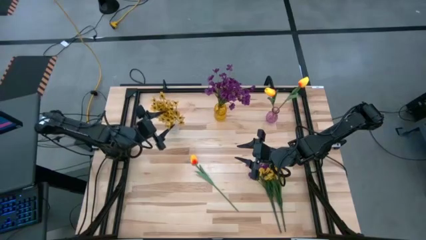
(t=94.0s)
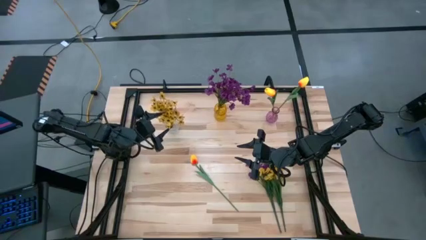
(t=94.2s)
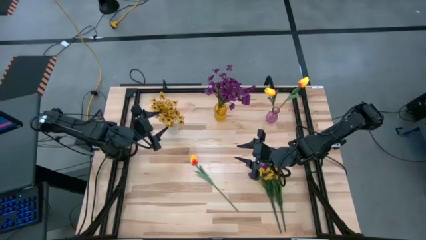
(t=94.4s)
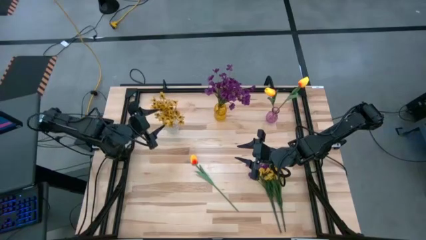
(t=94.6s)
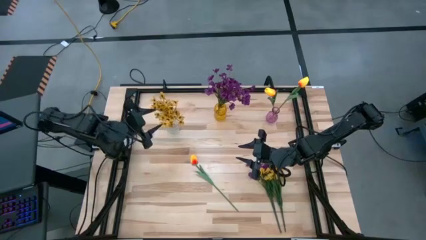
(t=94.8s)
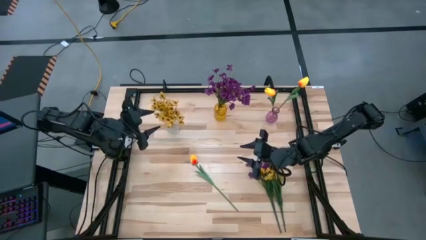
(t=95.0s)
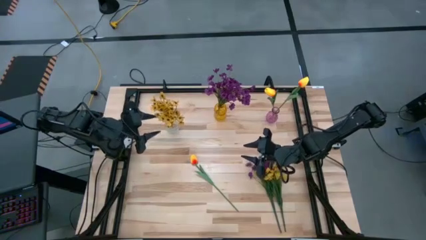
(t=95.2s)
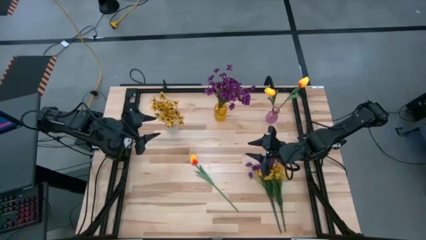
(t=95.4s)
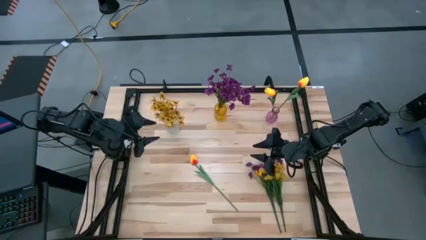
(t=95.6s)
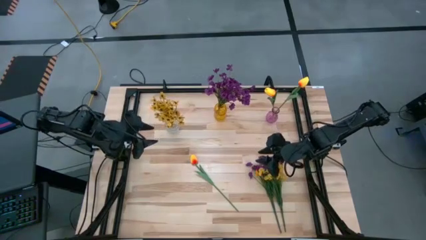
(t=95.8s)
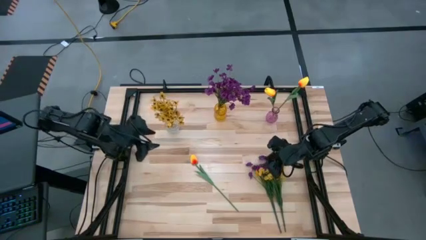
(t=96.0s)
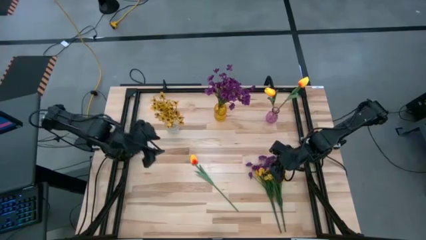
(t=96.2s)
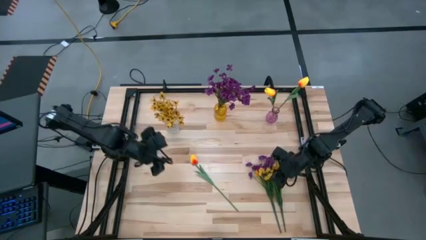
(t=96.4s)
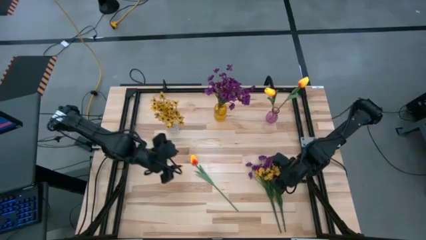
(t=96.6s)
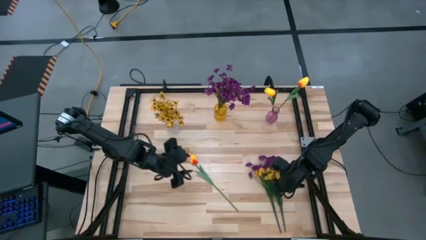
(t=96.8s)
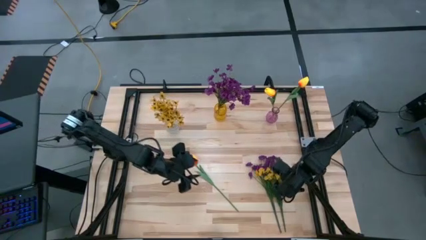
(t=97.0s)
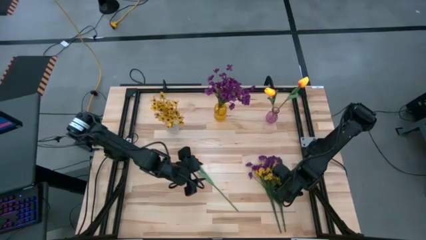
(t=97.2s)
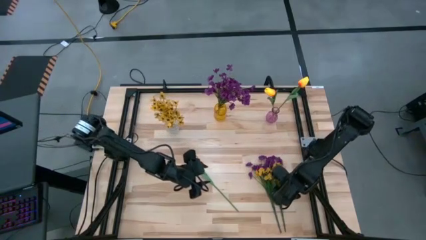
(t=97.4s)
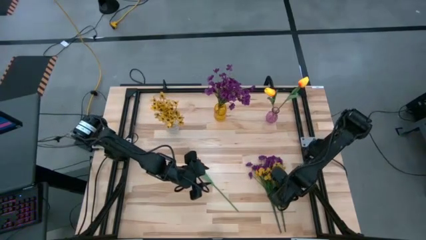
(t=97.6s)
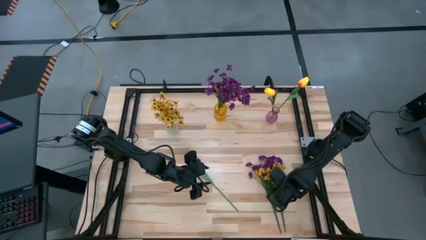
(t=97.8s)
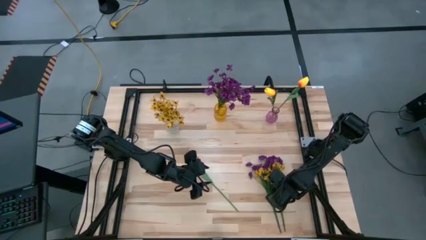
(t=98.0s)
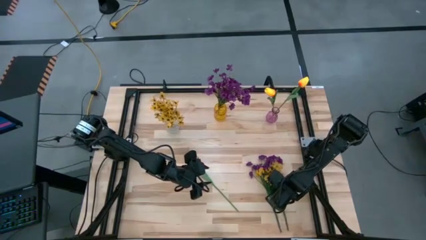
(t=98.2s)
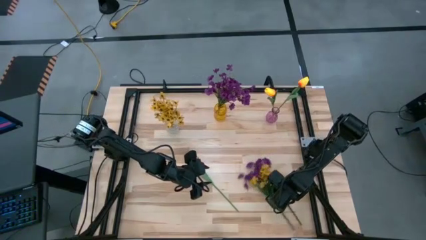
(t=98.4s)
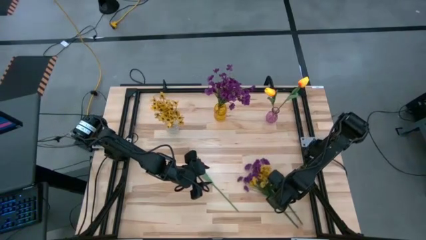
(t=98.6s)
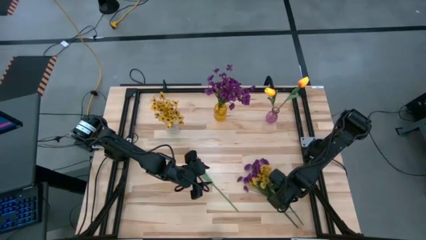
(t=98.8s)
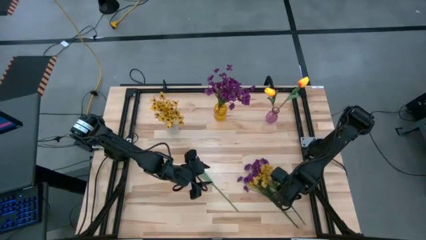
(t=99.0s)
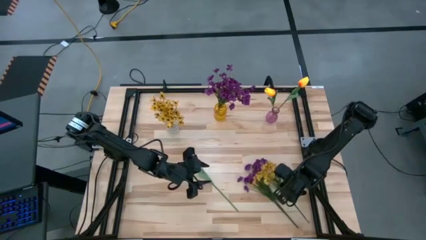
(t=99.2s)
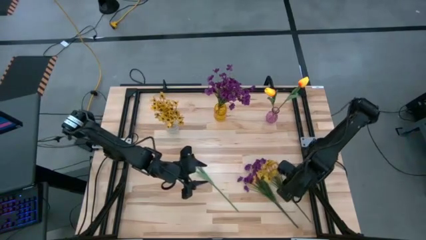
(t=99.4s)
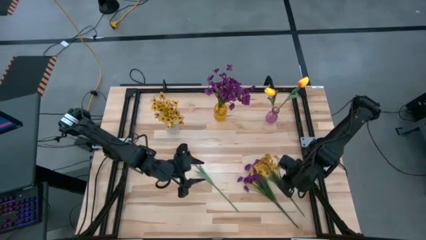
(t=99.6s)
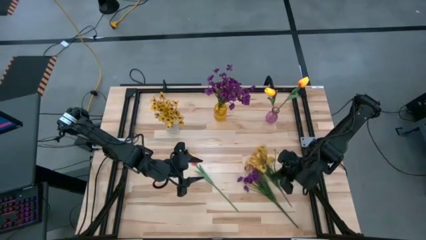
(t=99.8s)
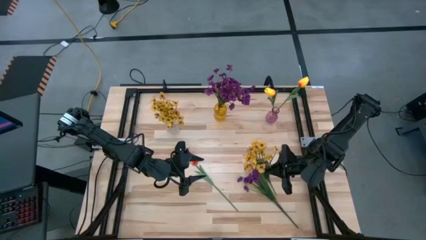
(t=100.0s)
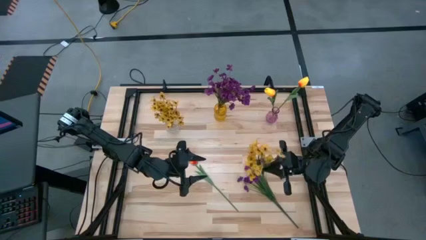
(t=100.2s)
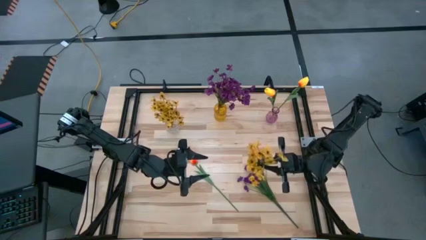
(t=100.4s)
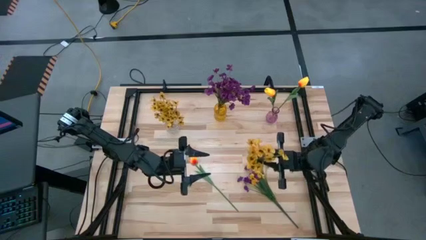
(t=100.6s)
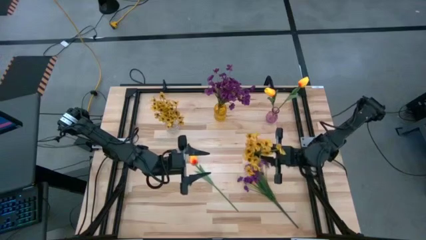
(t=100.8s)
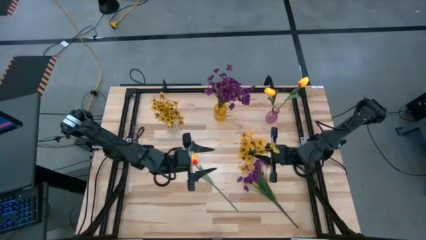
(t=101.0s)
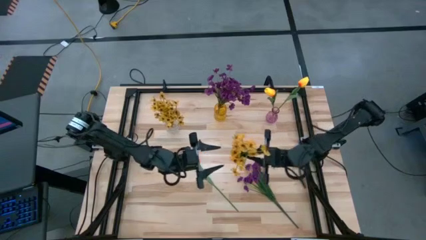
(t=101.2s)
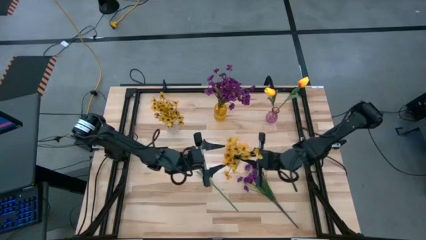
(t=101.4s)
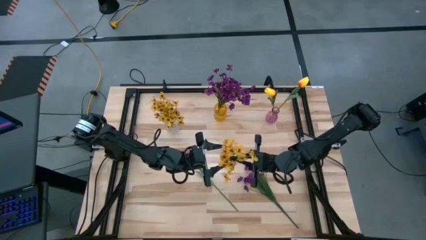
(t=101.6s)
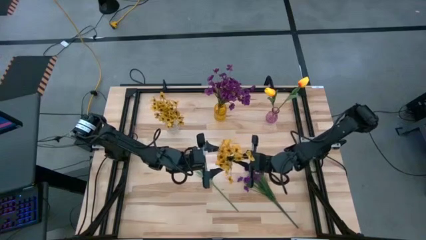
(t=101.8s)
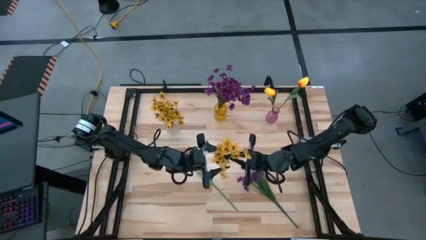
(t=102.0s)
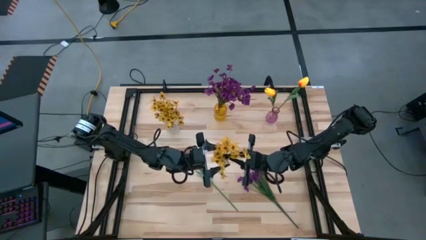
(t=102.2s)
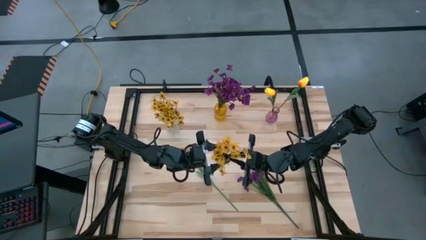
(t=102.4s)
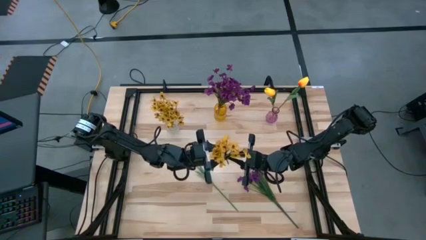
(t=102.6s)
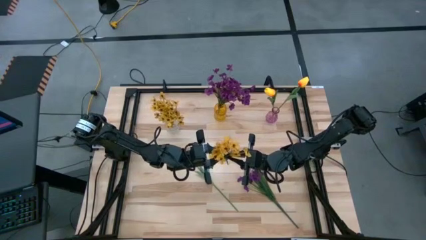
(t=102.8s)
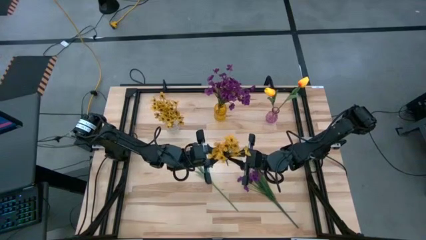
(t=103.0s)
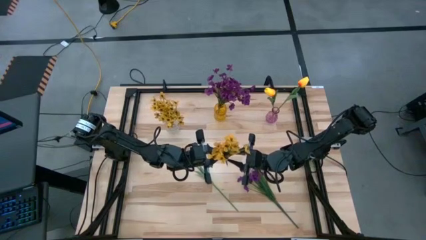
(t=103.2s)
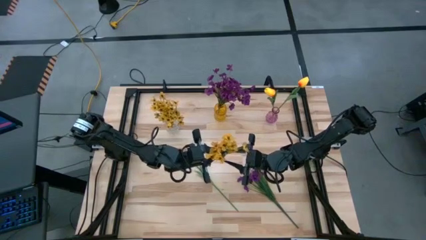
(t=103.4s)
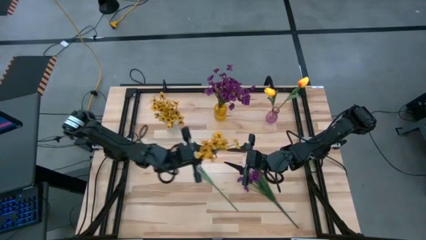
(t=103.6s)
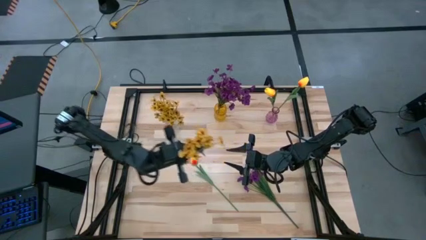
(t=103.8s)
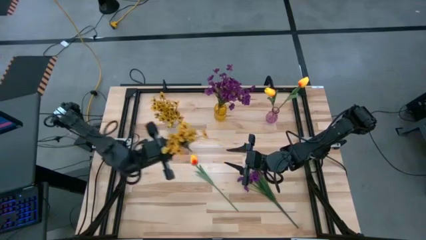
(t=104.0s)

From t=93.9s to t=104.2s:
Task: Sort flowers into vase by color
Put the yellow flowers into the transparent vase

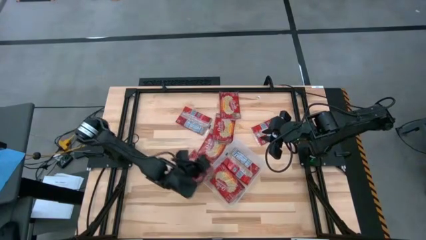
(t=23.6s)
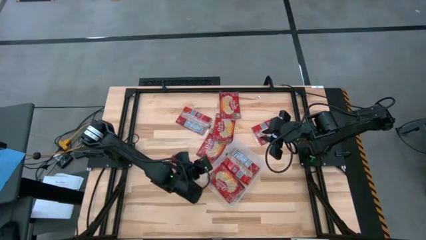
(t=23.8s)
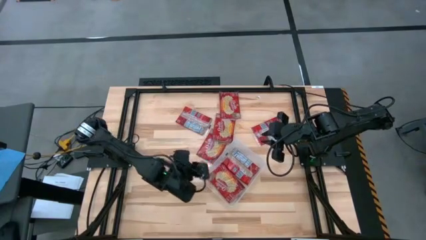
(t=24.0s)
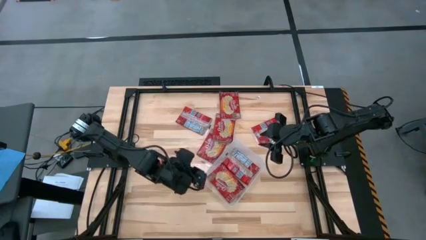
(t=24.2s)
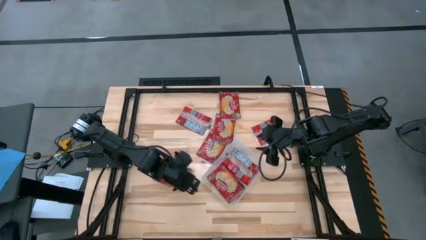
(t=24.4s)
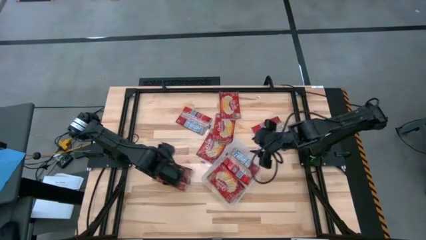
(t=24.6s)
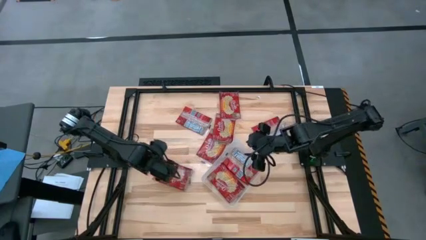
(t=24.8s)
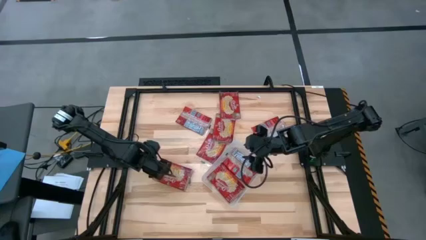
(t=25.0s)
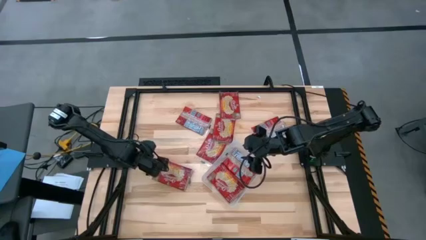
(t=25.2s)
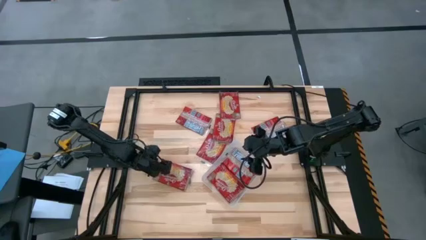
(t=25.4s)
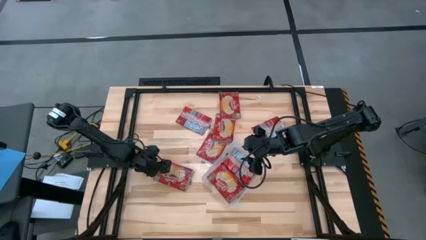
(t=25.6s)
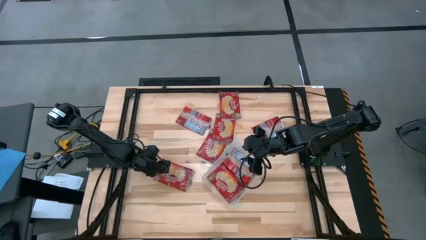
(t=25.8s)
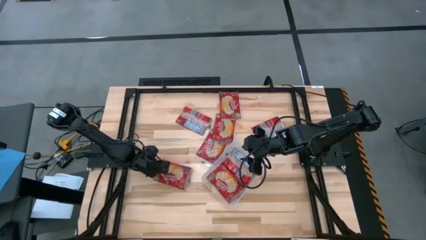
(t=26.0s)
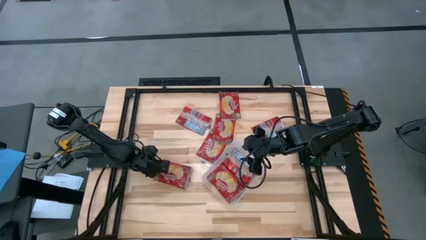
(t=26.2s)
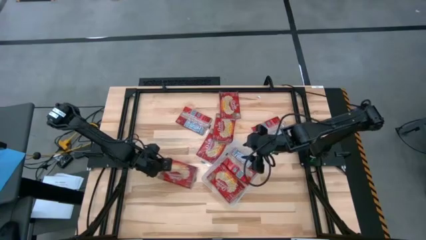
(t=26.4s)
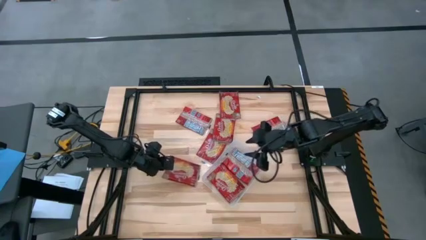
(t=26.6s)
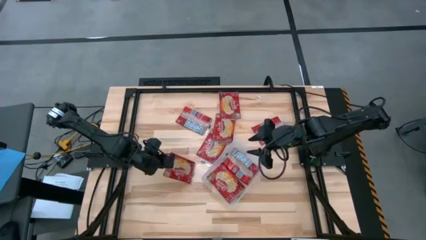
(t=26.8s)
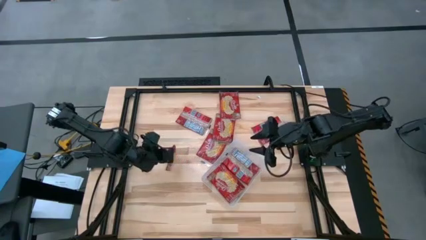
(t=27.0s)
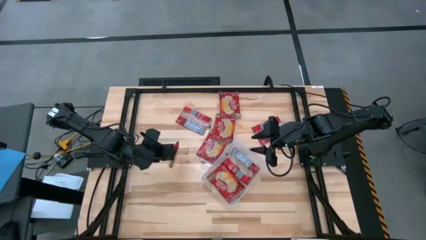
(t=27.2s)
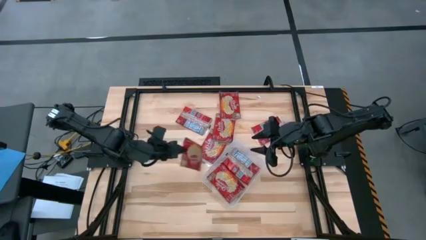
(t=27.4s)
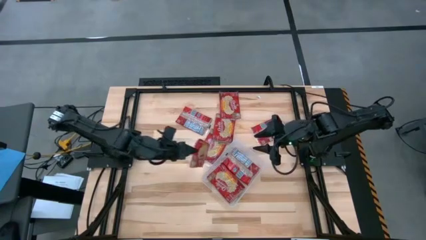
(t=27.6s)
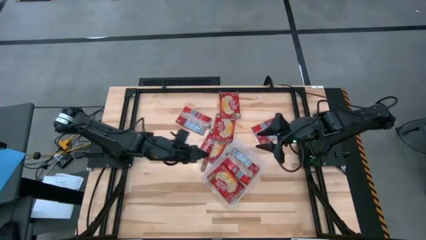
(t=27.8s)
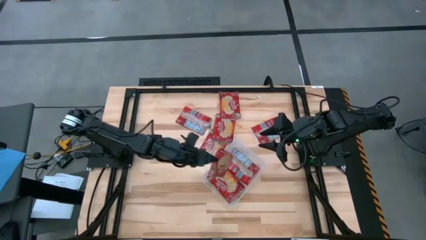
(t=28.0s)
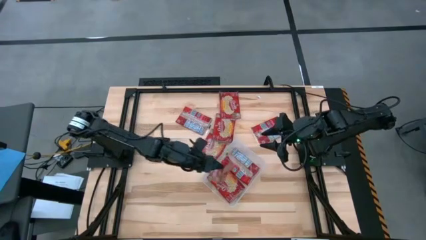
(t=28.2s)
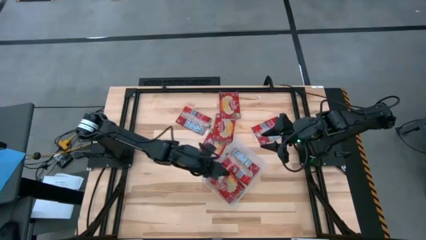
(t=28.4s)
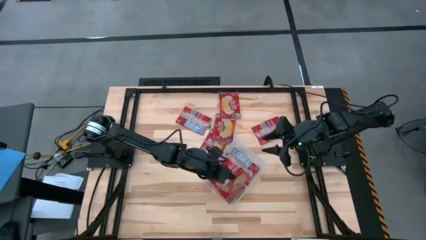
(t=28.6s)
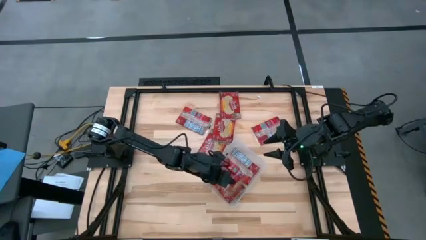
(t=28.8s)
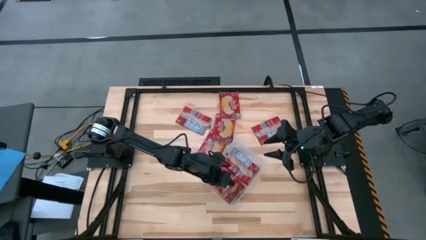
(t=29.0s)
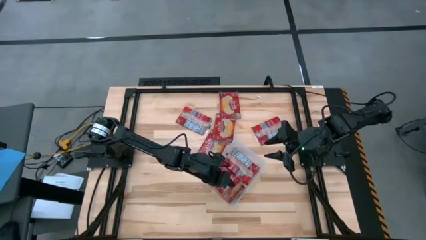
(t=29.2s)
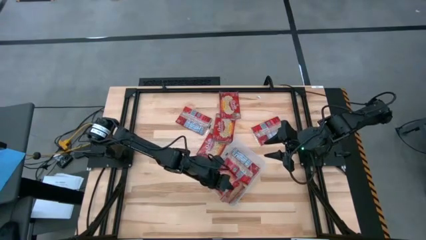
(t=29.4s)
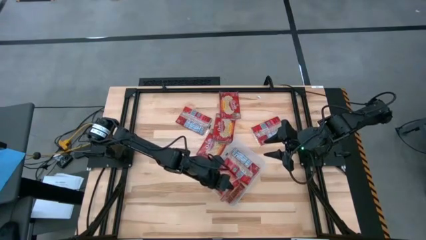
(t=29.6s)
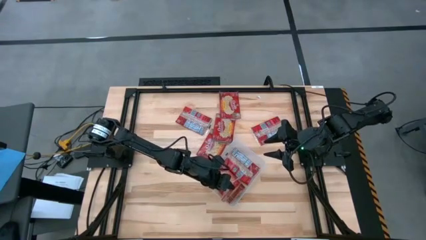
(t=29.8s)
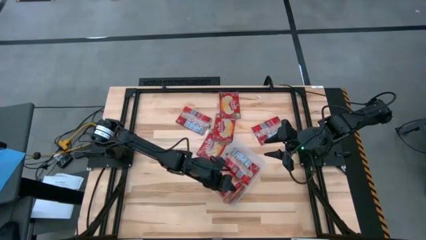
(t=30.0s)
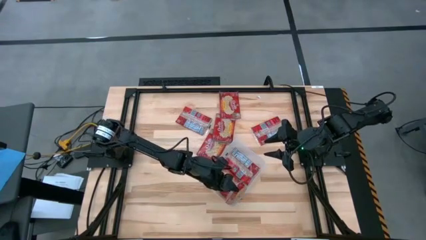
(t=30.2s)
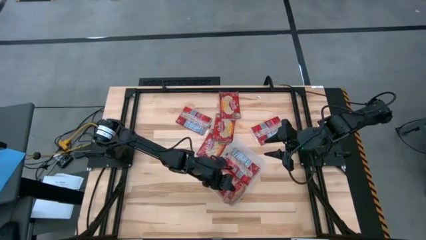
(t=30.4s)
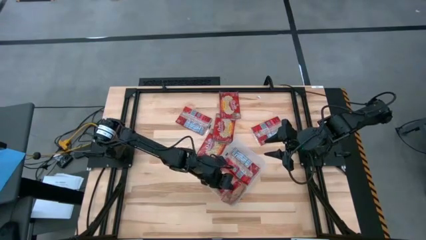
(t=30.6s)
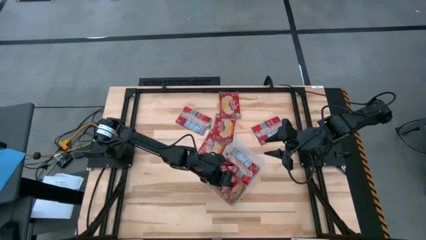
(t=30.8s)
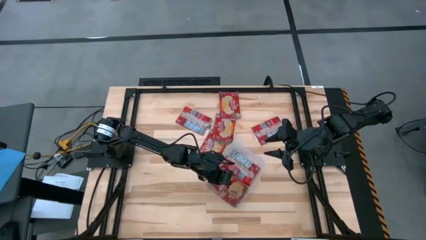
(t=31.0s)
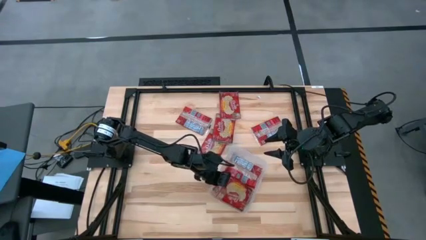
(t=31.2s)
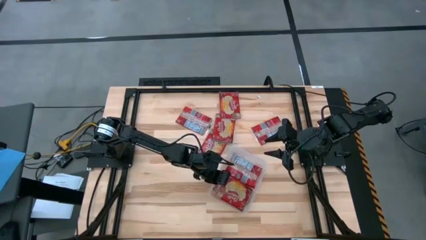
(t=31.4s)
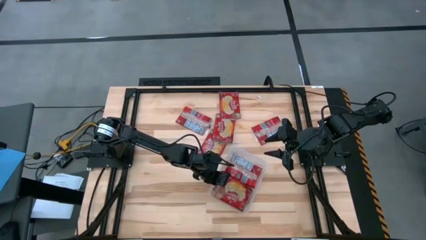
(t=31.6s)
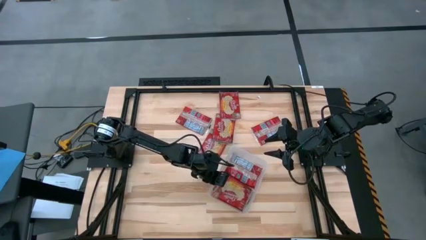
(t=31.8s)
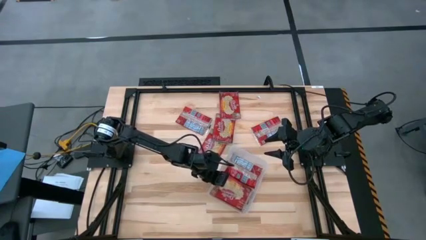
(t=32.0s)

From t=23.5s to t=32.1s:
Task: Sort popcorn bags into baskets
Put the red popcorn bag into the transparent bin
